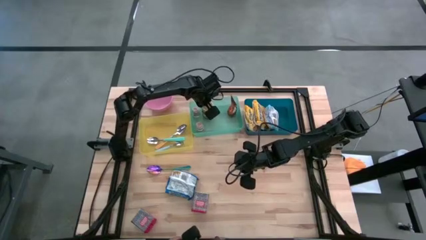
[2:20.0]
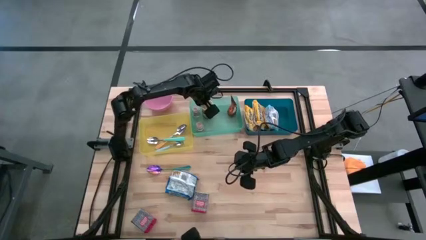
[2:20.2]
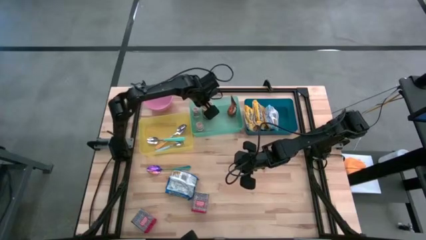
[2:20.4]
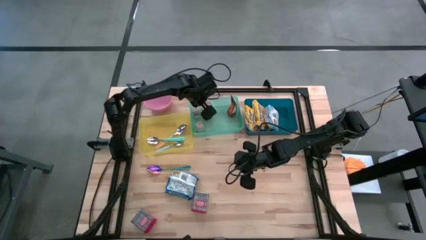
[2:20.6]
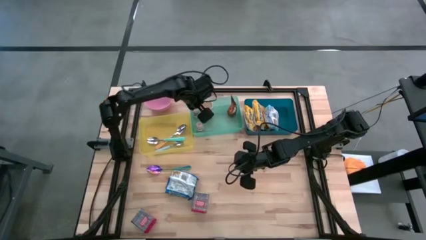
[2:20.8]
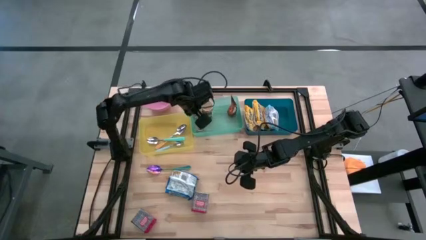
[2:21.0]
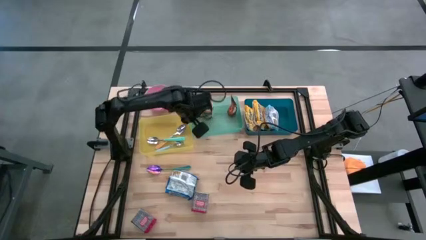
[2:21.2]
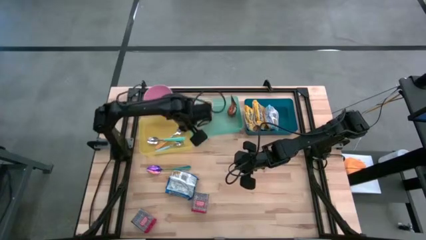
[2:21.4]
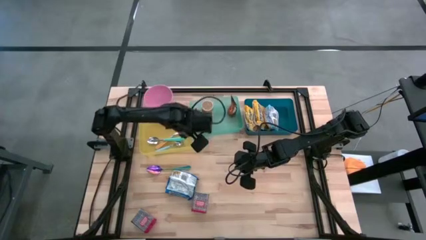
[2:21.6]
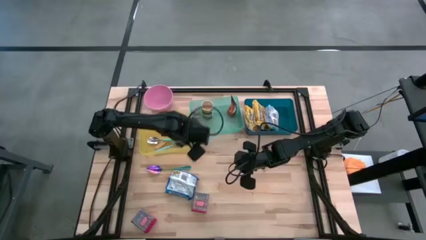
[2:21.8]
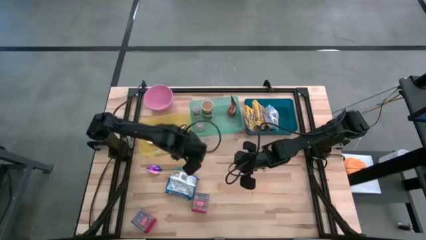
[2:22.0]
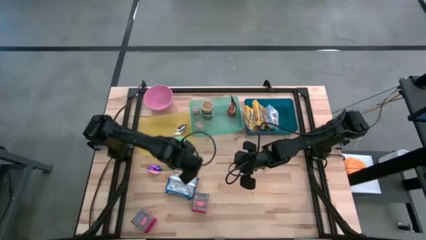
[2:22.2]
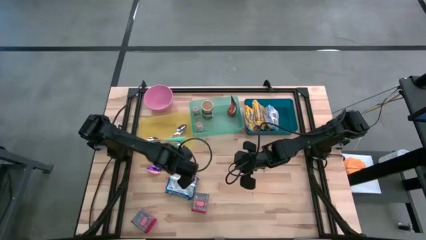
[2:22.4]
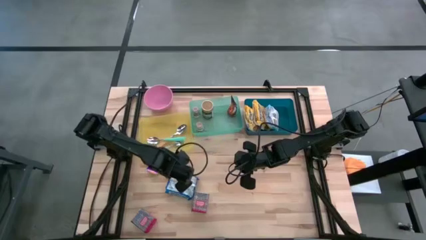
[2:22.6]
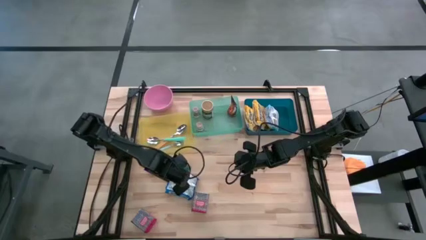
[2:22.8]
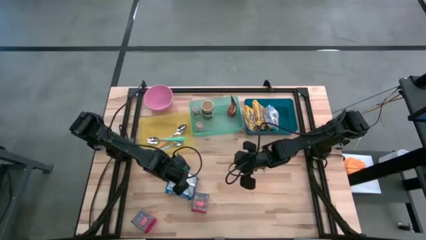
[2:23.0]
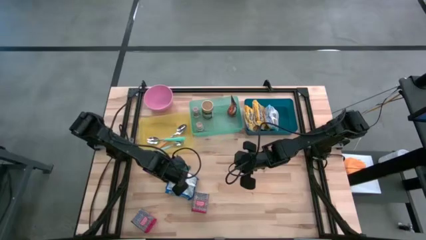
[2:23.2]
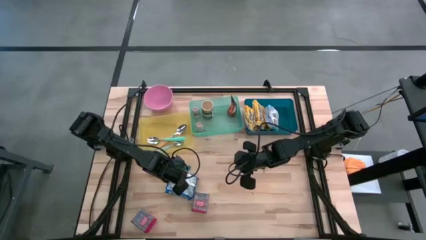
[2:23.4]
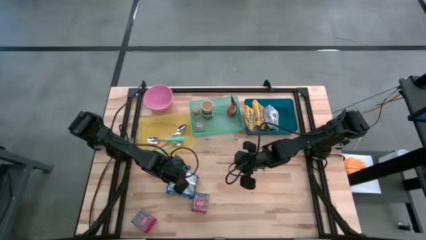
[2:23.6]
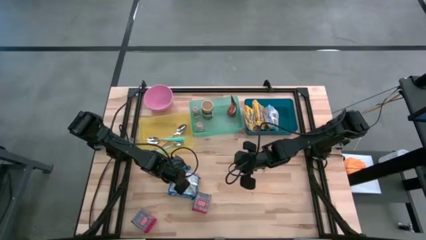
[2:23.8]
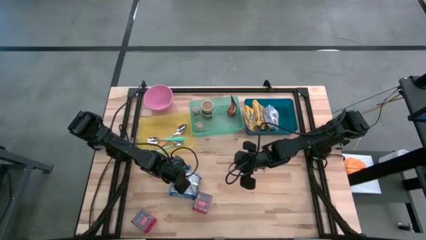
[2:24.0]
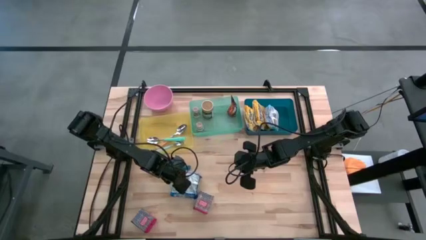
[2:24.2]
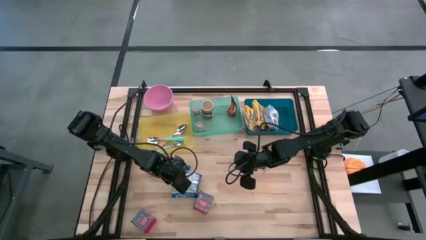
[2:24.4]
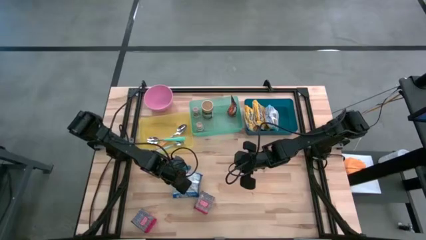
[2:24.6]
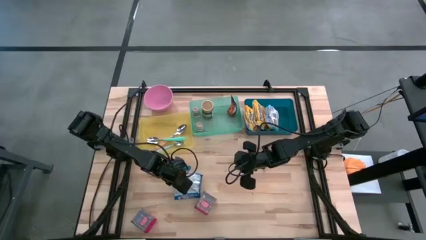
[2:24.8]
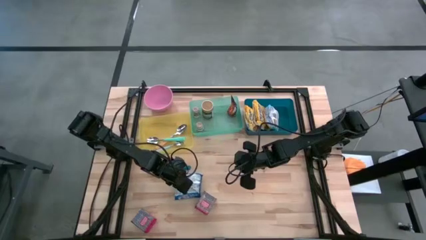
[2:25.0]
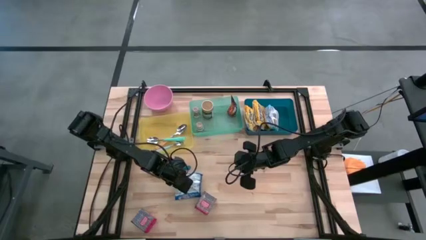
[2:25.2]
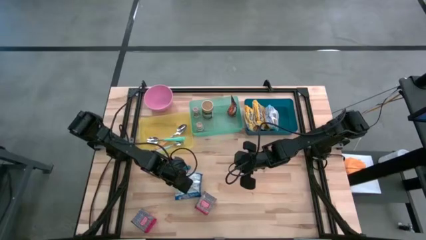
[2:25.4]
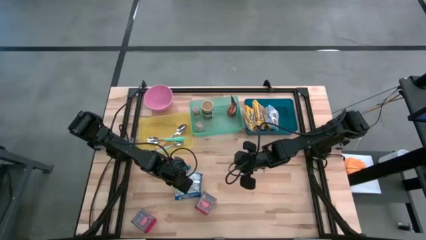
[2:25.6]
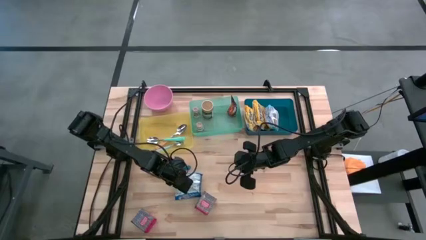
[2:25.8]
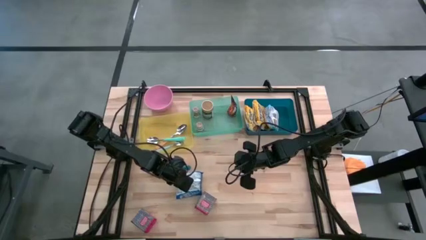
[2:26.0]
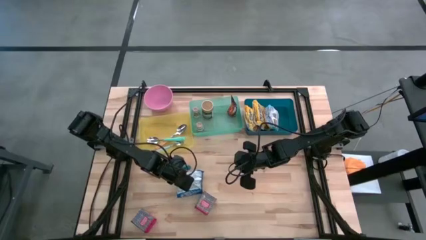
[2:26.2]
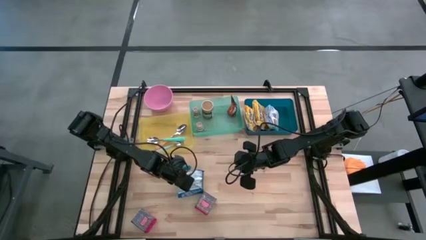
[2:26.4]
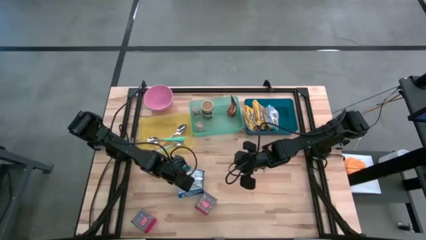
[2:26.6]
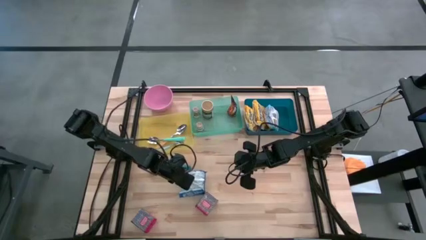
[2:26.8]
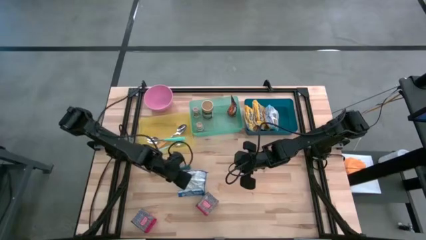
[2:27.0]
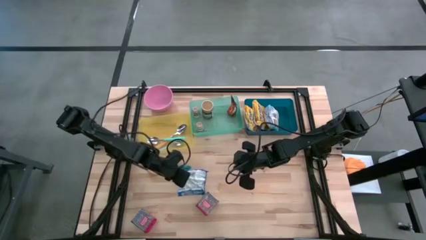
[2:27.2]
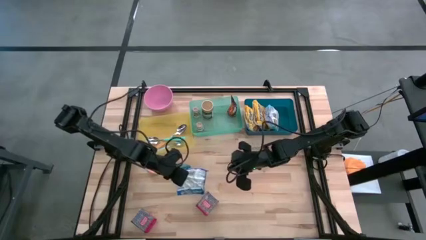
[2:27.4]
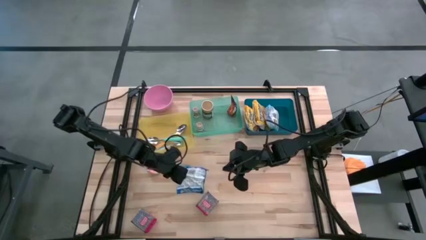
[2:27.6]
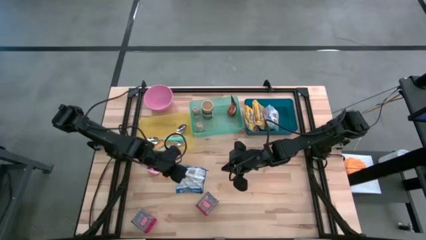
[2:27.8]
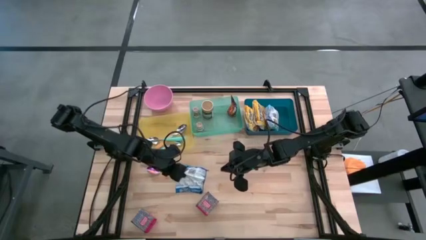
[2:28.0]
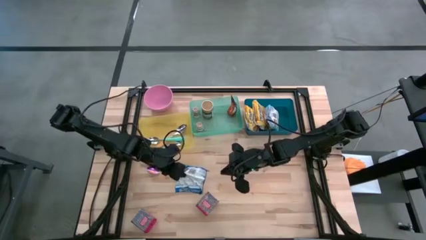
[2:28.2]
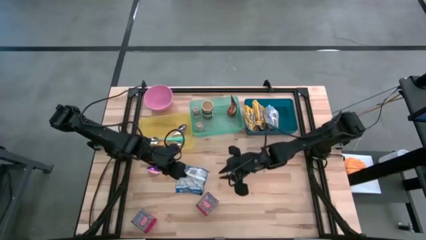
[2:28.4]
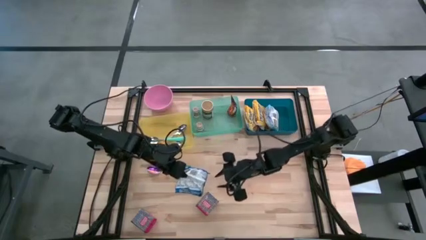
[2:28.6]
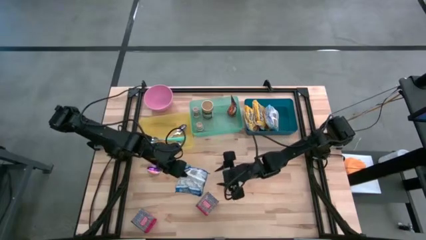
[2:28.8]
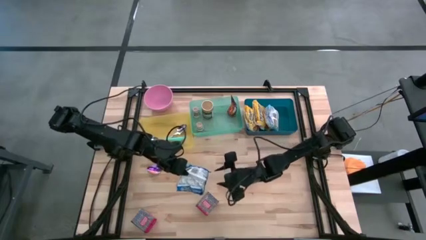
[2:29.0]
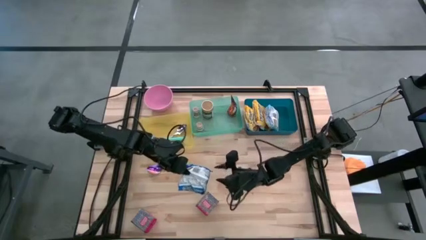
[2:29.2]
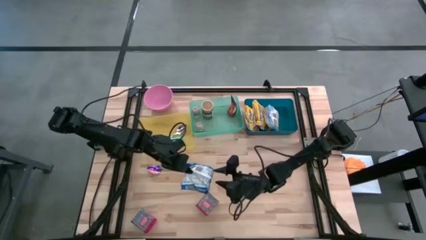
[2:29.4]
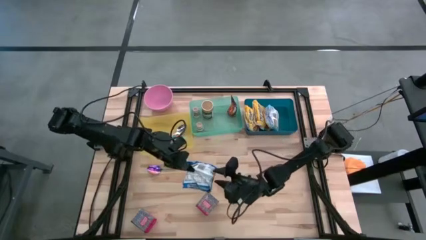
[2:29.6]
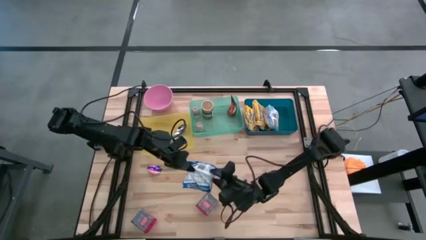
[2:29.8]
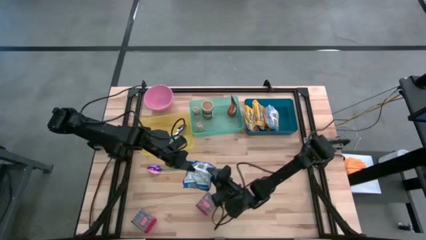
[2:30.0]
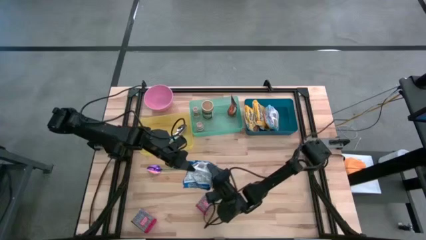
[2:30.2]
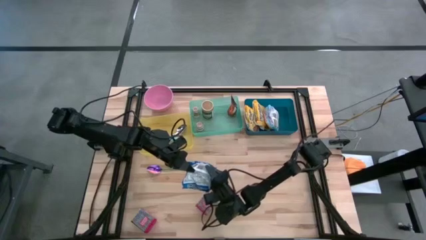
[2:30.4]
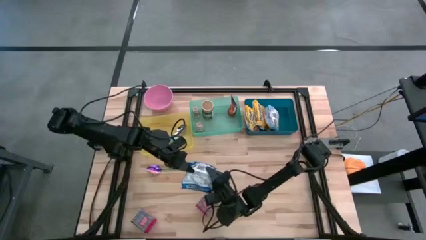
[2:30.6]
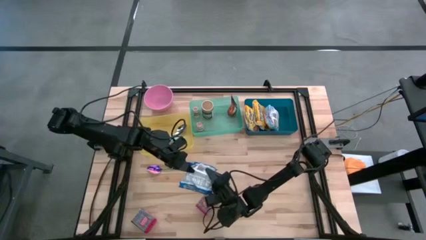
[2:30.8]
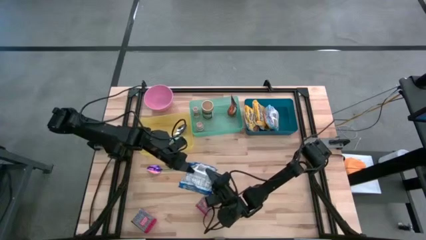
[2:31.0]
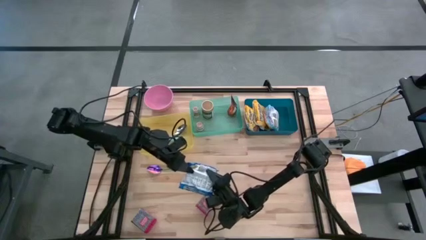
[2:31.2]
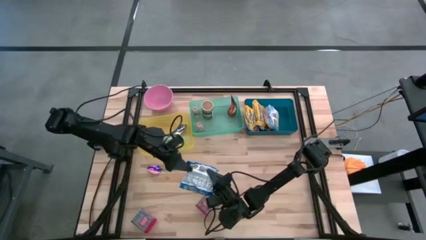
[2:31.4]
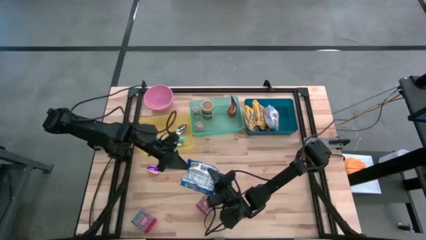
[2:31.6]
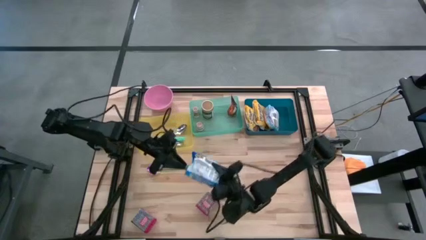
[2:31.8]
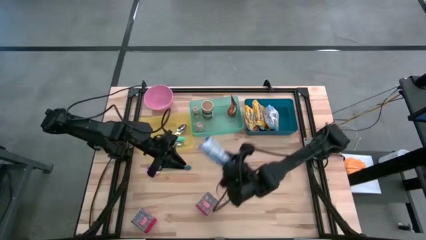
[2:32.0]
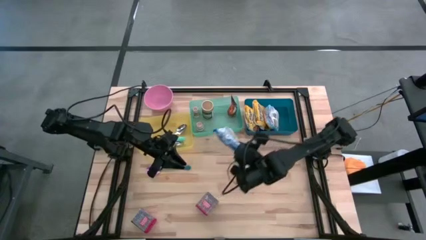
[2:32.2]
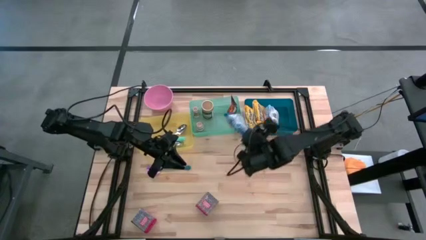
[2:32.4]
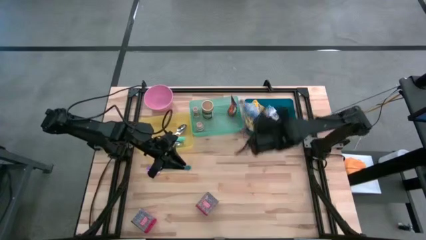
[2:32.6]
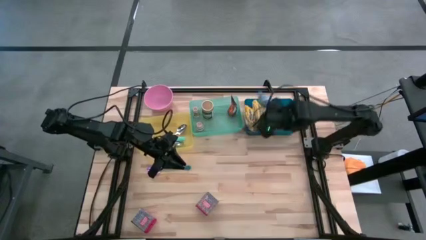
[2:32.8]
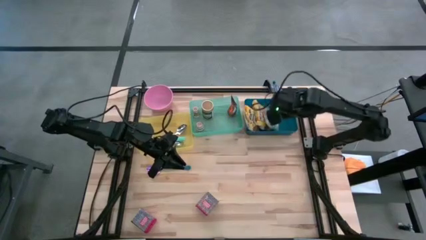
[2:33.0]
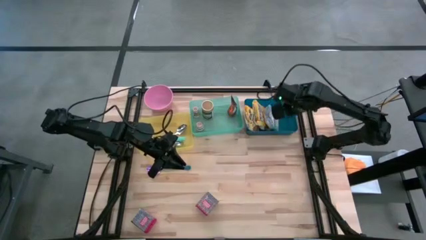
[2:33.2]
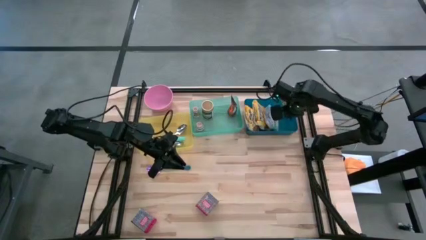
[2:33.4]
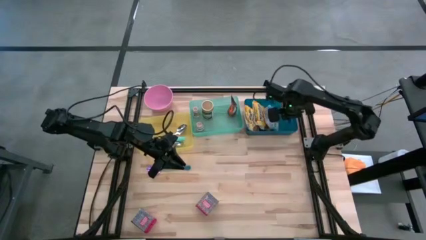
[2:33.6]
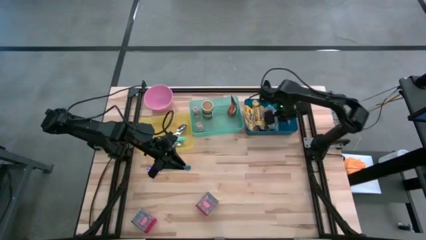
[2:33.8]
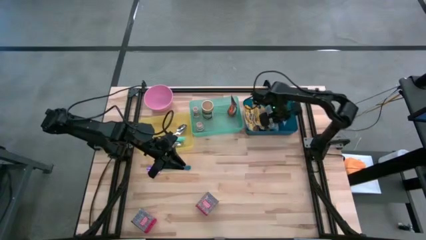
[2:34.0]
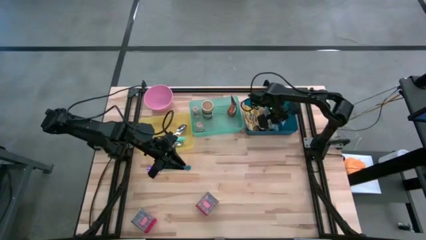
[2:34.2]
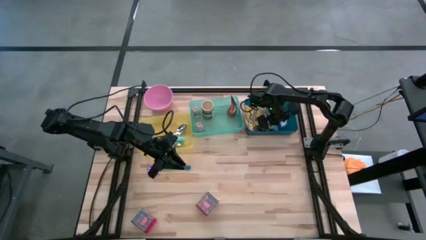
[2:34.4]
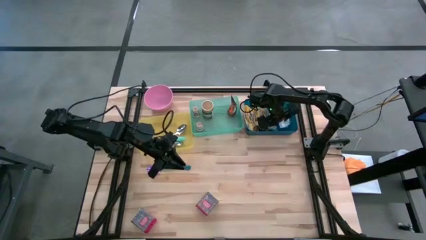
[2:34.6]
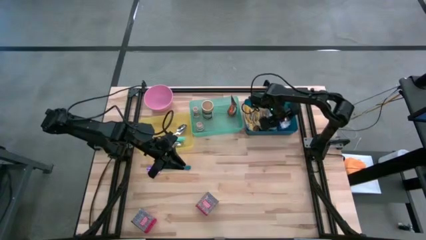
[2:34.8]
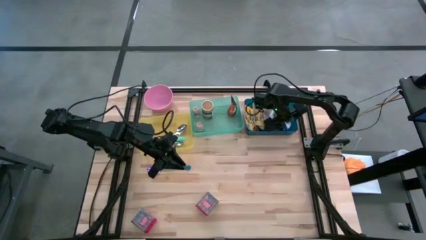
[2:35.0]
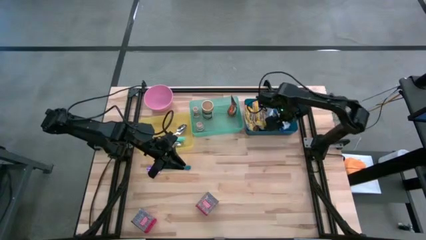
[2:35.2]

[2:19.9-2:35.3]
Put the blue noodle pack into the blue bin
